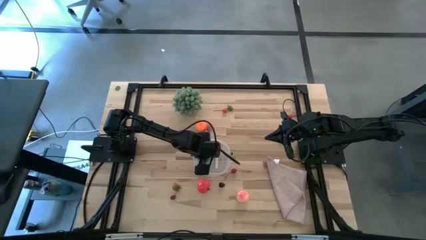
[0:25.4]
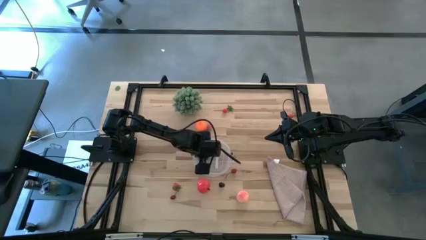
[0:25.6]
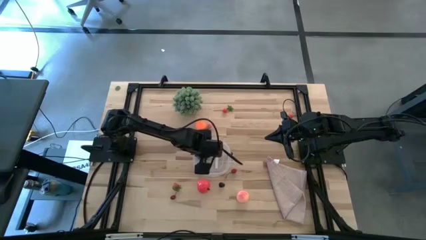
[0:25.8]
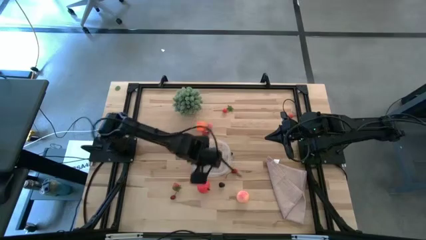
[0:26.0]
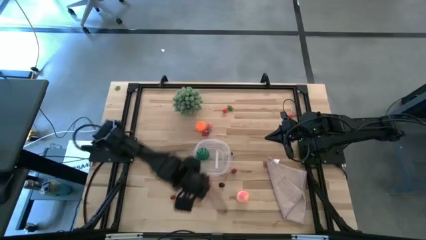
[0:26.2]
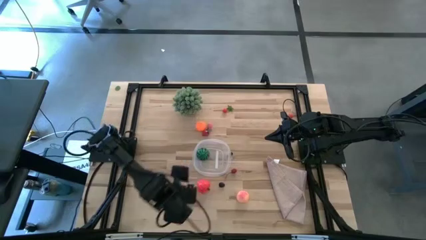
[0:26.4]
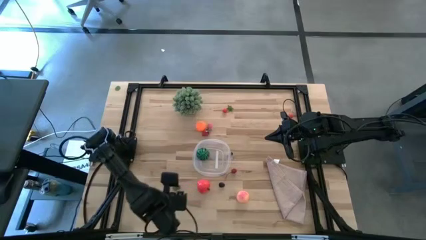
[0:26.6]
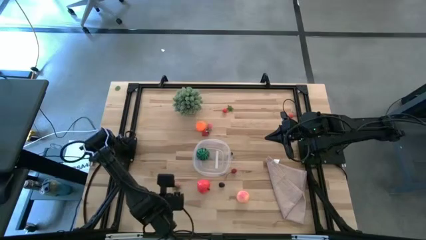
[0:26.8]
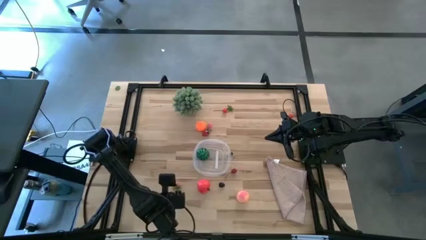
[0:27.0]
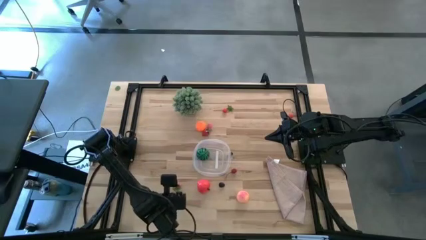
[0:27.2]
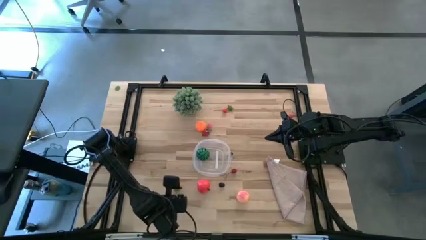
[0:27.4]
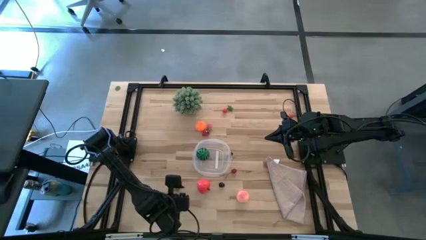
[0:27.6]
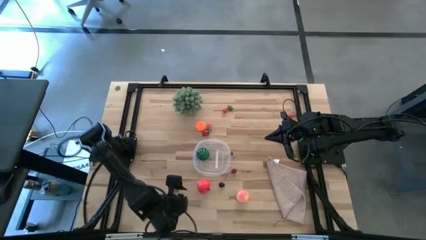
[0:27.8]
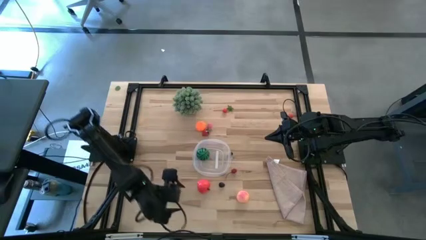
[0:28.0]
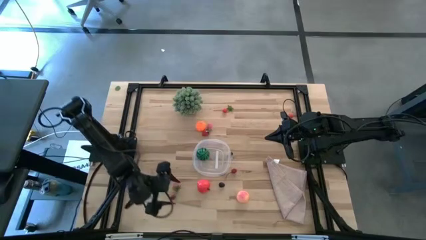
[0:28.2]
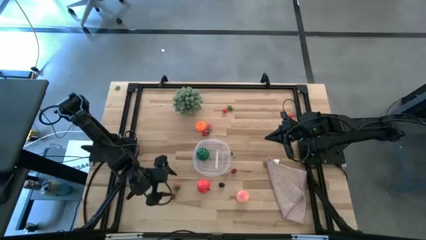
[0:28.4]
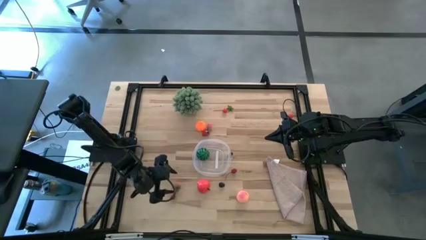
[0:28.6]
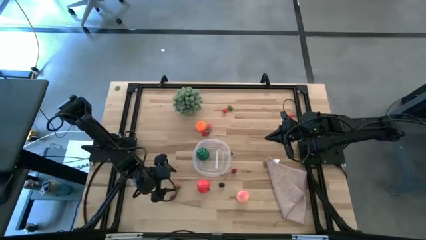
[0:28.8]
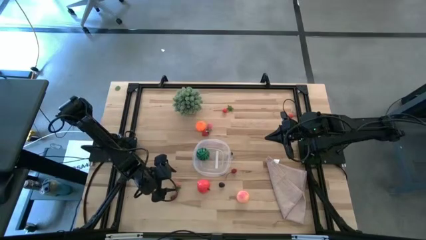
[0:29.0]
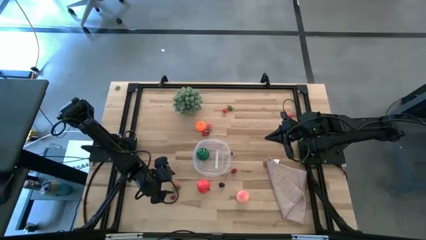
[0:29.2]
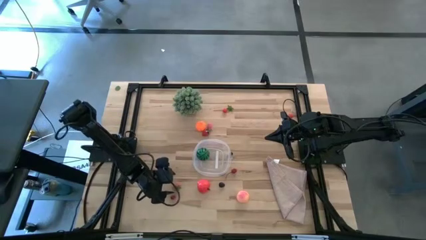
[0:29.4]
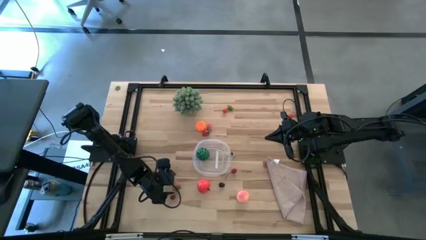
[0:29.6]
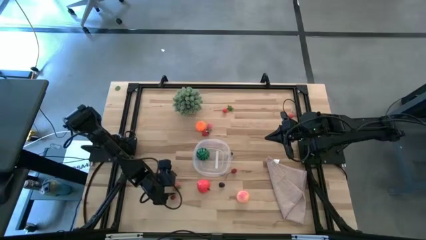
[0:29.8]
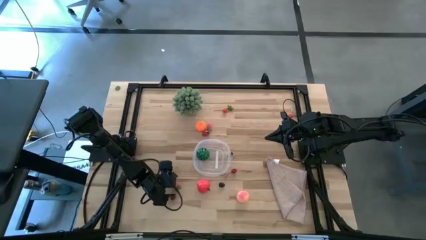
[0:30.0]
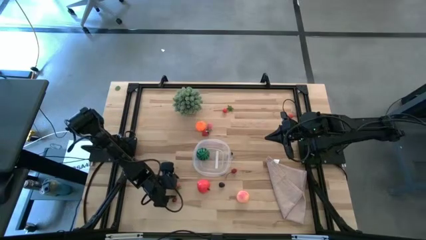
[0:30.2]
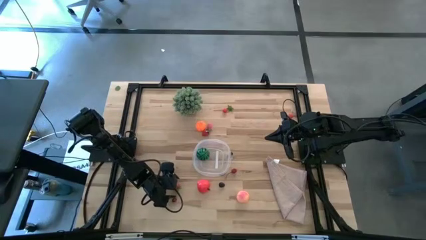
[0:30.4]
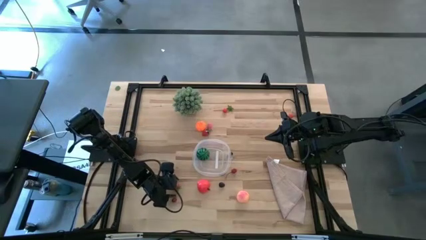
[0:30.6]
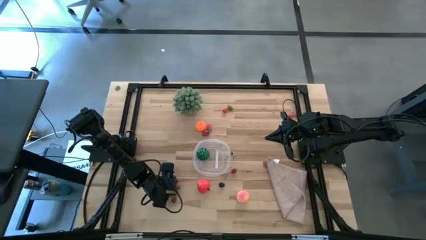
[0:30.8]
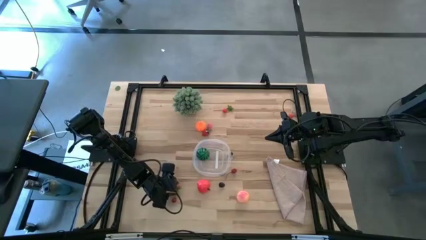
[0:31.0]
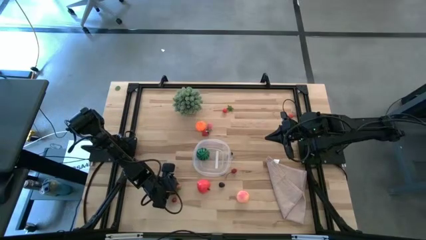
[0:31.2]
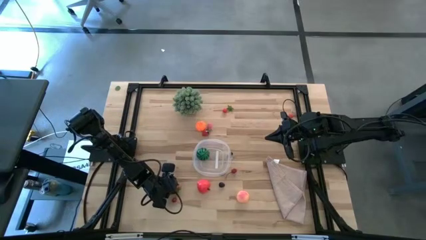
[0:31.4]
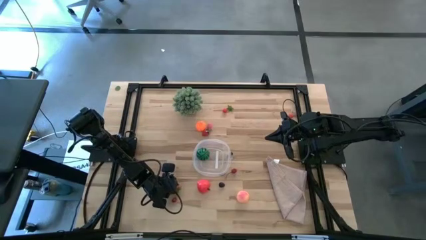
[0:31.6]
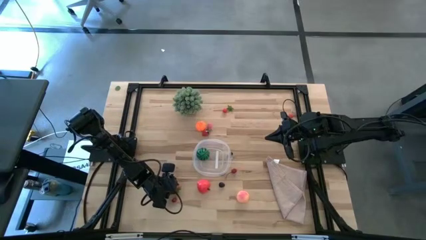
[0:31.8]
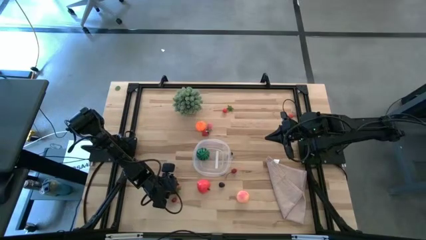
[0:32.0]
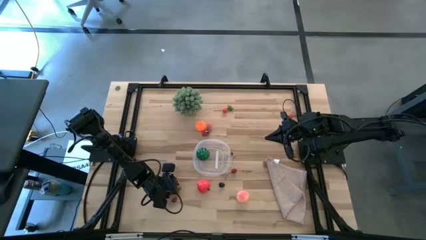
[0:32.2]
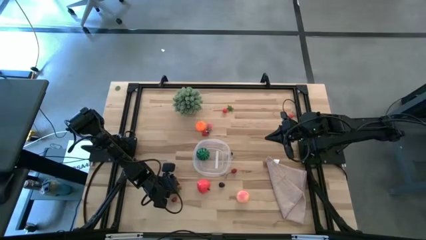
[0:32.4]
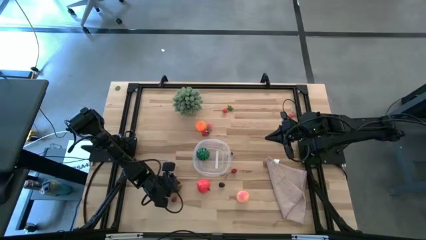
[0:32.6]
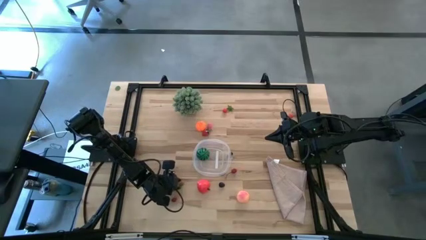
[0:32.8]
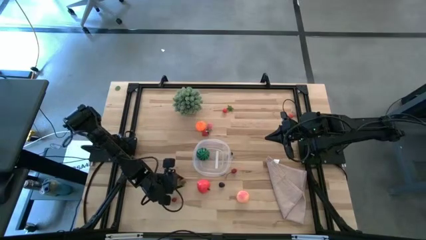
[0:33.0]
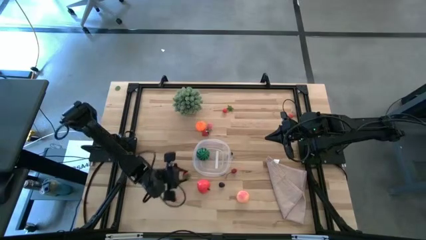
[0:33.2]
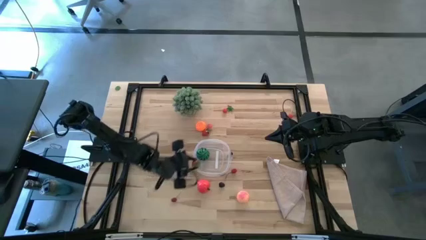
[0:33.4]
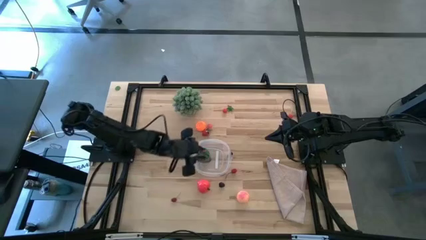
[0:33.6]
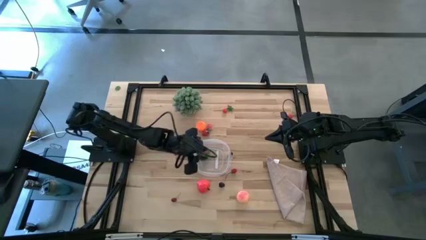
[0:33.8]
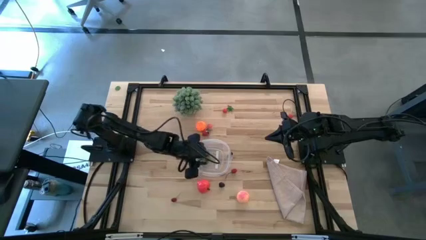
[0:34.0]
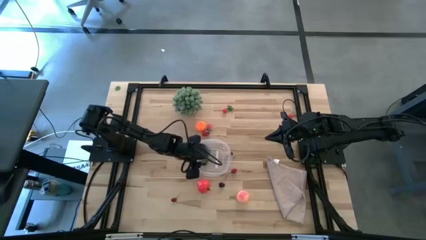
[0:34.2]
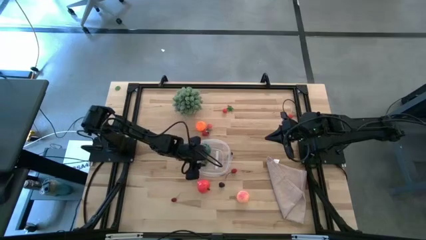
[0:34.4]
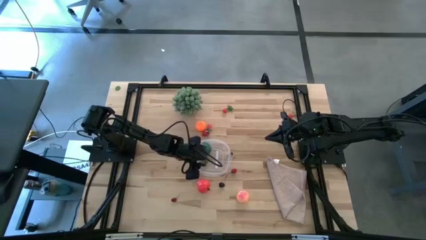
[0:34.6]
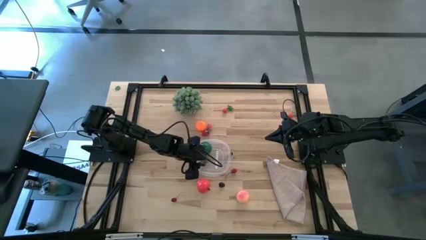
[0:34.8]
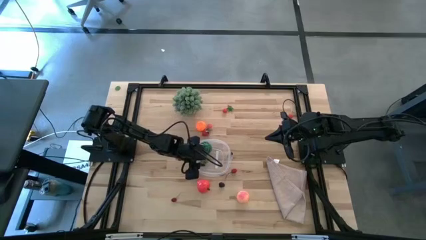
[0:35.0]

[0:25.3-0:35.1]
Task: Pick and placing Produce into tupperware
Put the bottom strawberry into the transparent container

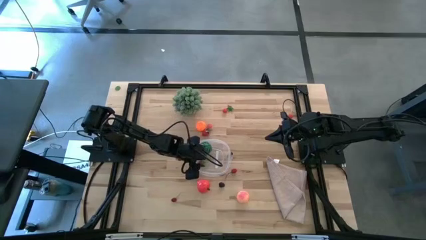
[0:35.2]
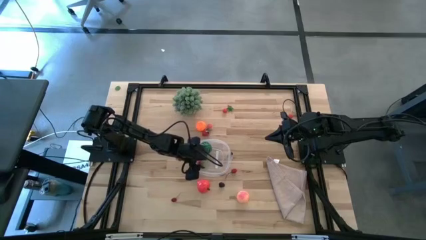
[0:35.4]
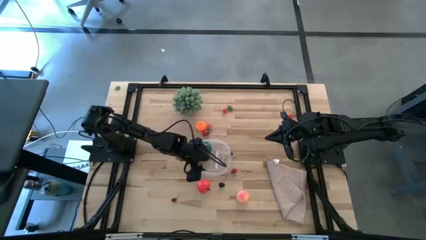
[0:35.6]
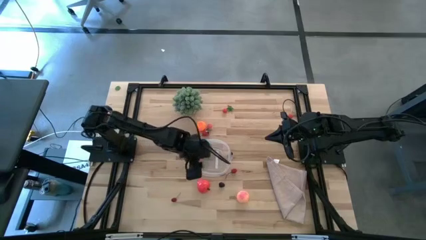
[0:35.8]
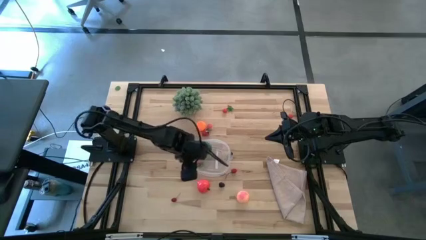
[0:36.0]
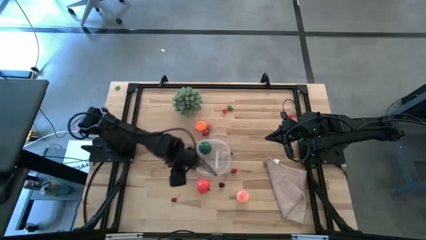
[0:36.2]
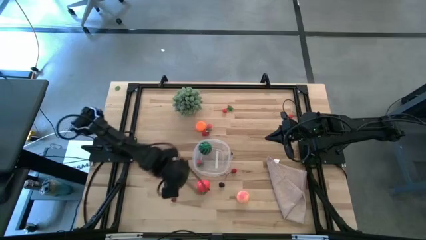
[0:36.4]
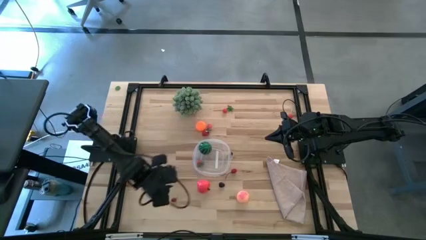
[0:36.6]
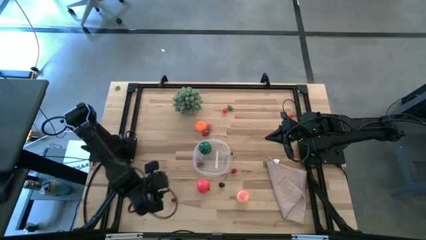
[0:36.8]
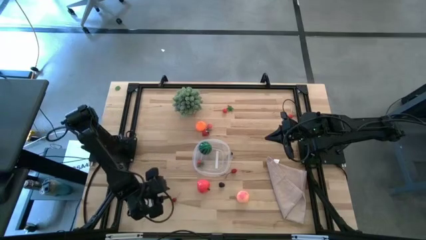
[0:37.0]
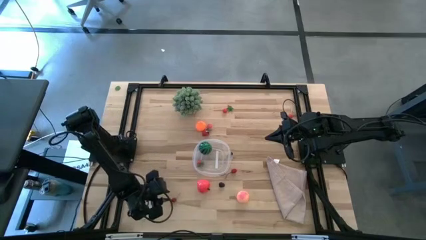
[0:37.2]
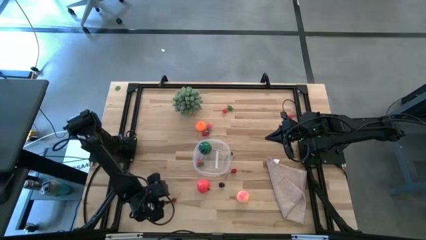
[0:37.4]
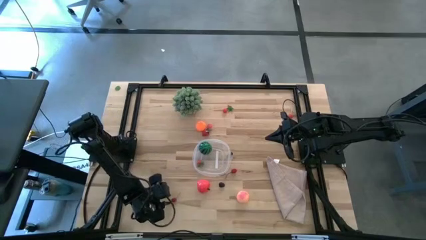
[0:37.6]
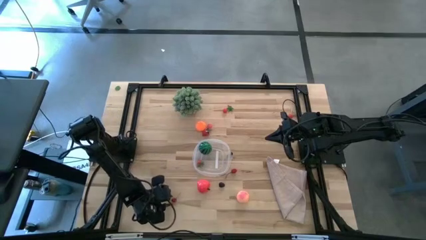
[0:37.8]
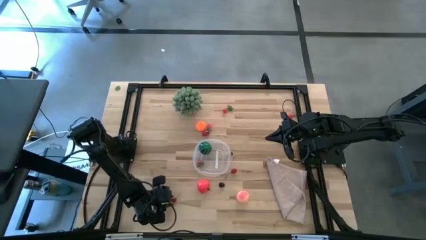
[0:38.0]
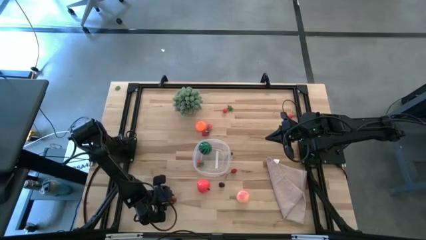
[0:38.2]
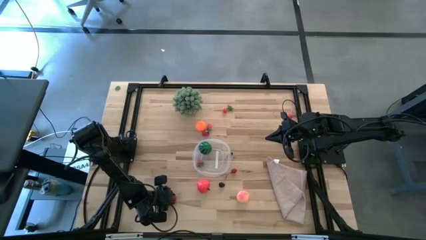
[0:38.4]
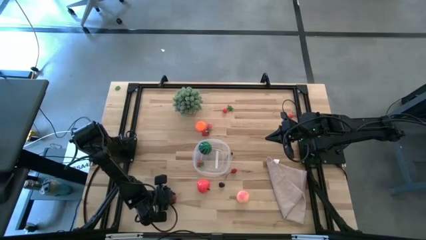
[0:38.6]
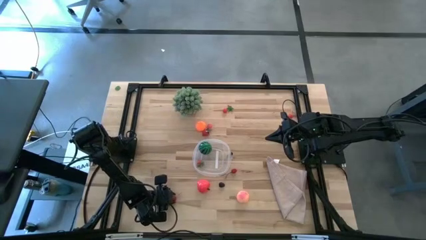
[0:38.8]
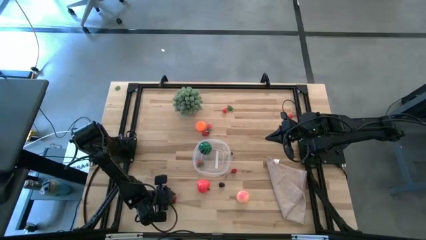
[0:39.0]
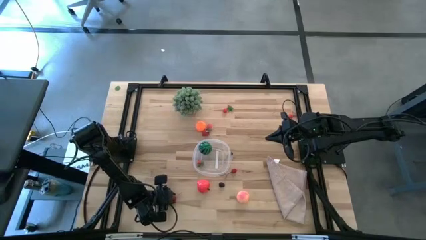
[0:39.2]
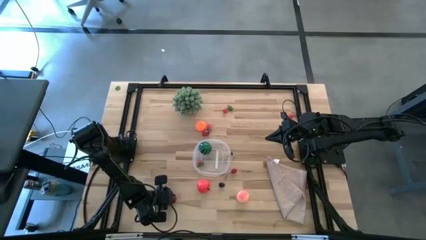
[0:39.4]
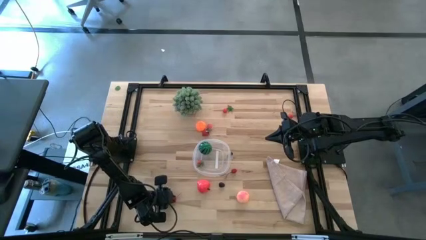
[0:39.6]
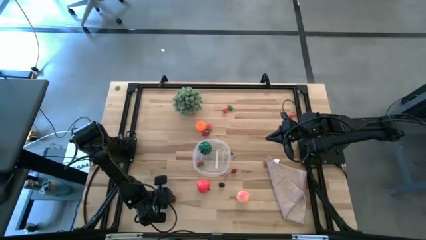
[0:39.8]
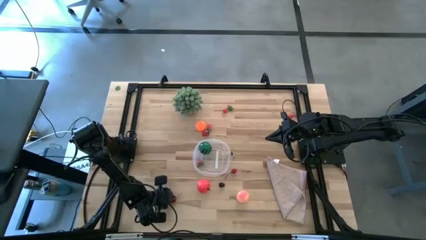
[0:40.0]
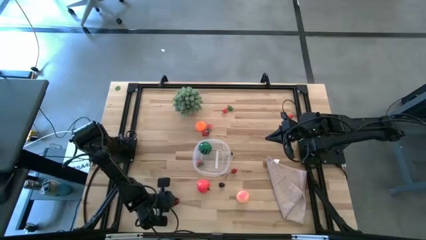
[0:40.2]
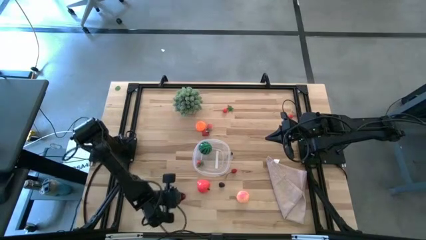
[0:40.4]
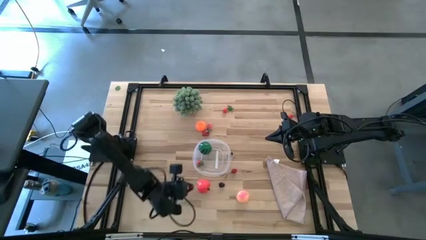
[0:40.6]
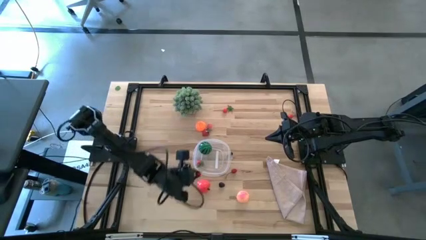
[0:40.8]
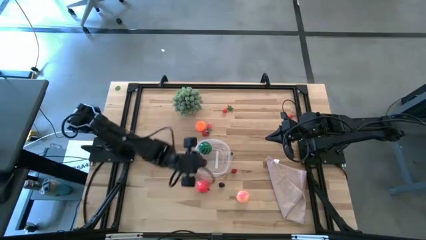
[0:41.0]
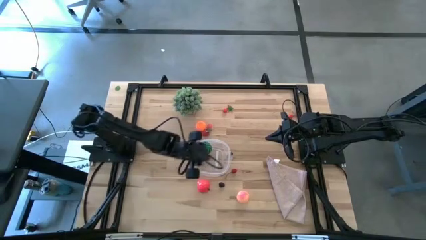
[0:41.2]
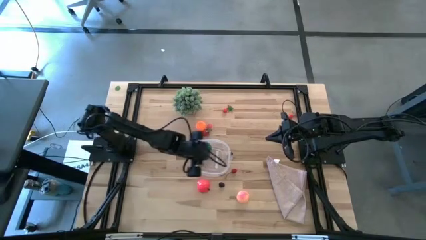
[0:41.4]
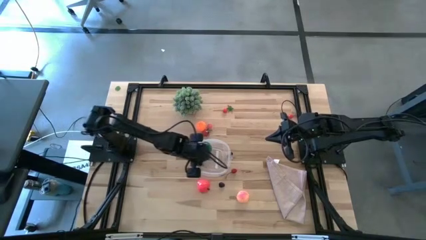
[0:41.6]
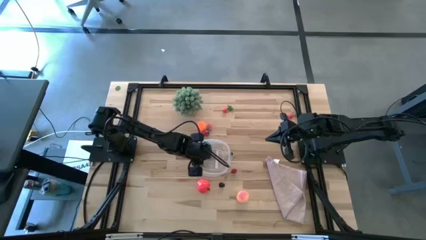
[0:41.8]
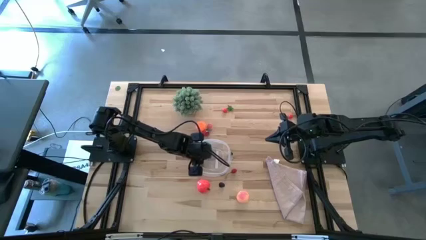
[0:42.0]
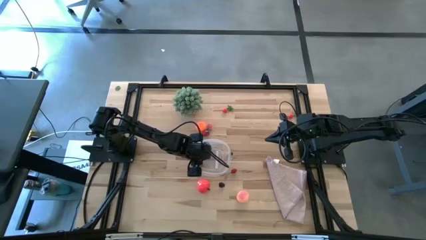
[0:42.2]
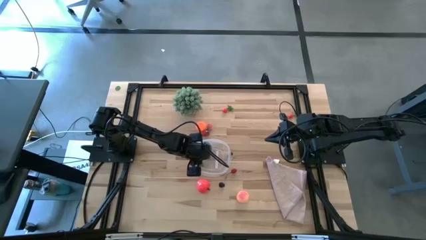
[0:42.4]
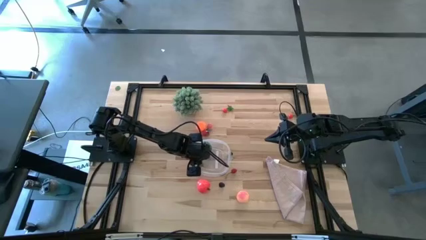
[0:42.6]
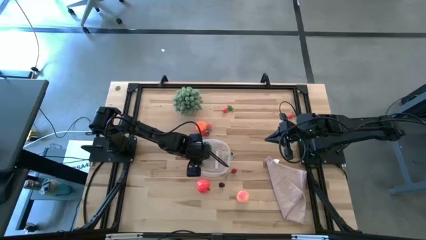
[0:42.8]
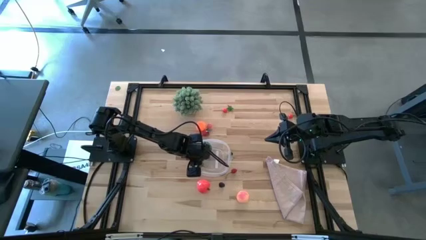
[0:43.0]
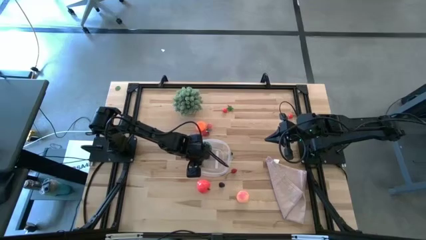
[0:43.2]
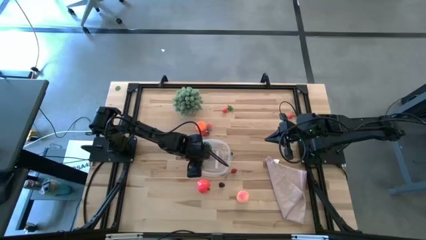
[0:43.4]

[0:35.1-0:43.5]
Put the bottom cherry into the transparent container
